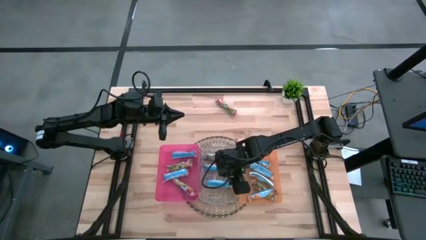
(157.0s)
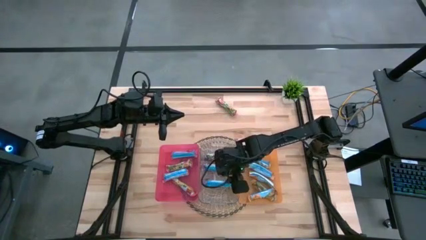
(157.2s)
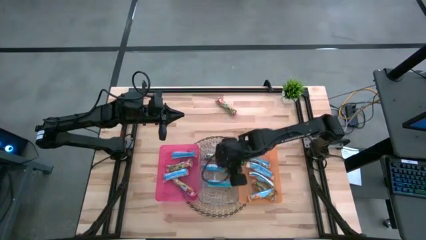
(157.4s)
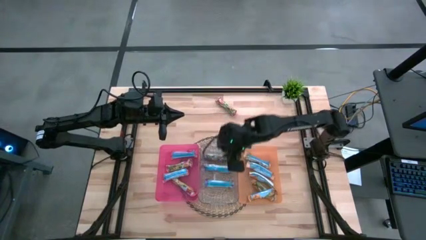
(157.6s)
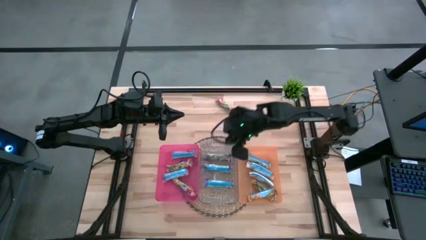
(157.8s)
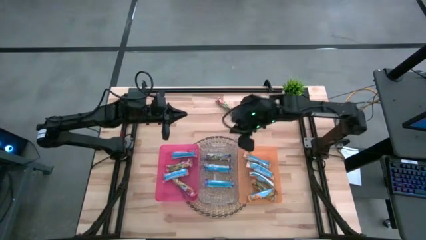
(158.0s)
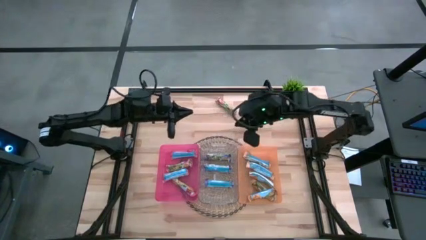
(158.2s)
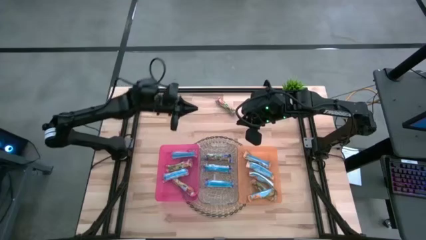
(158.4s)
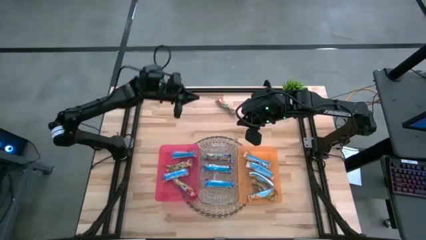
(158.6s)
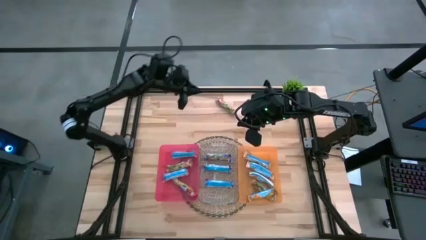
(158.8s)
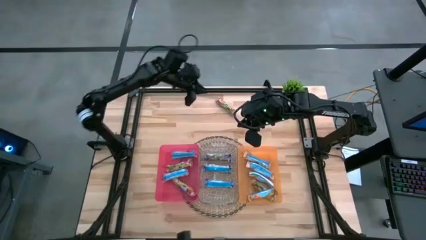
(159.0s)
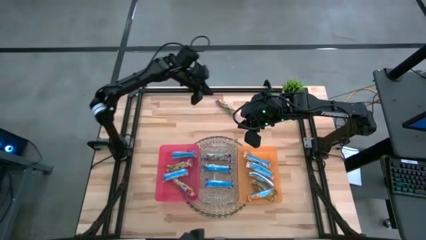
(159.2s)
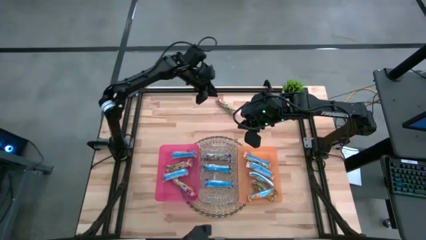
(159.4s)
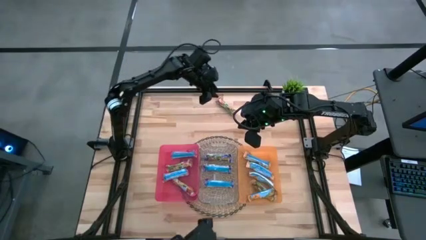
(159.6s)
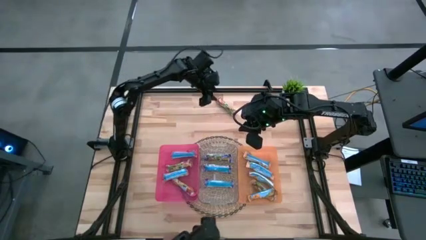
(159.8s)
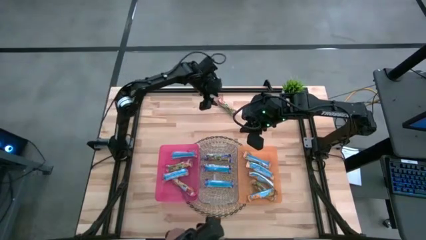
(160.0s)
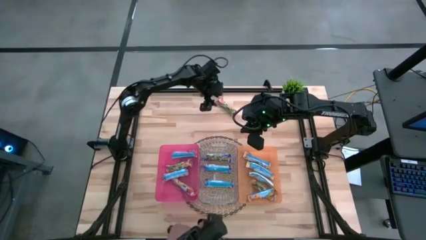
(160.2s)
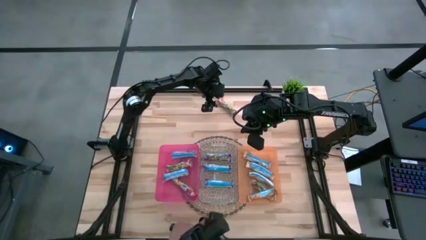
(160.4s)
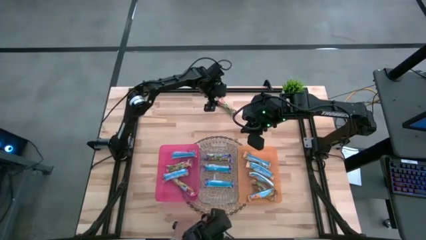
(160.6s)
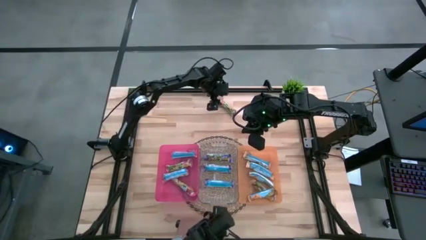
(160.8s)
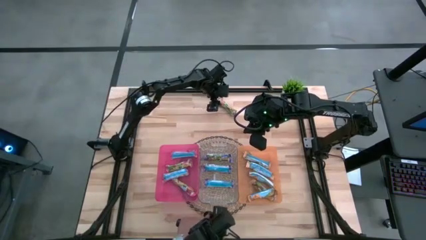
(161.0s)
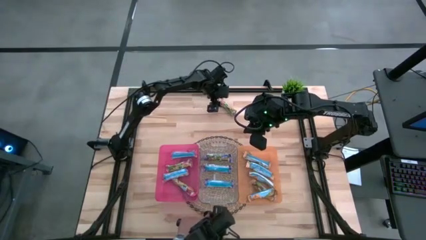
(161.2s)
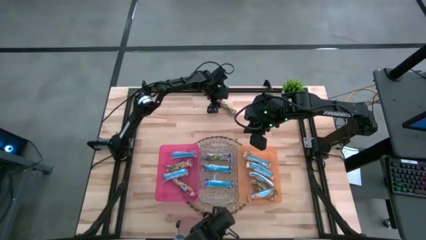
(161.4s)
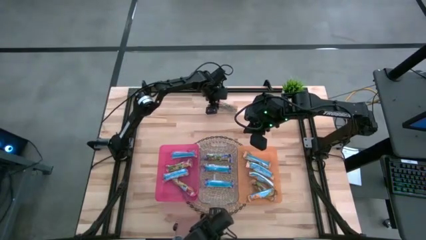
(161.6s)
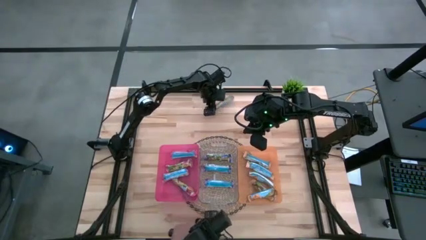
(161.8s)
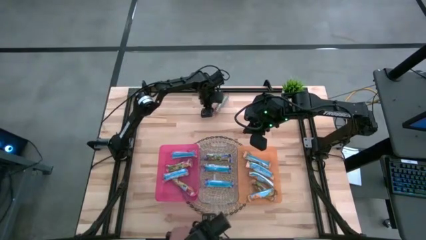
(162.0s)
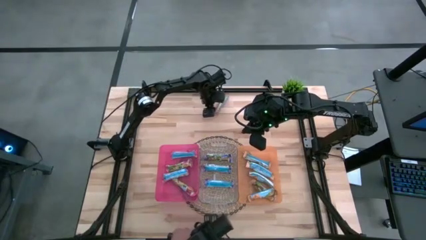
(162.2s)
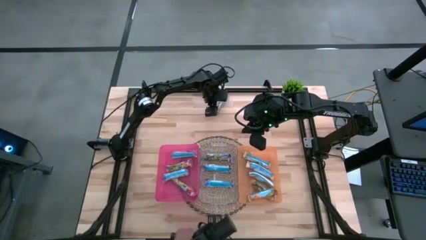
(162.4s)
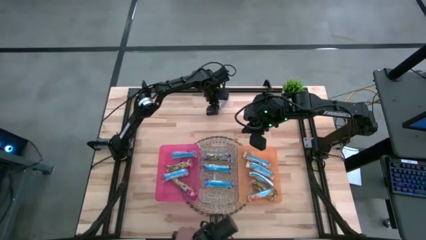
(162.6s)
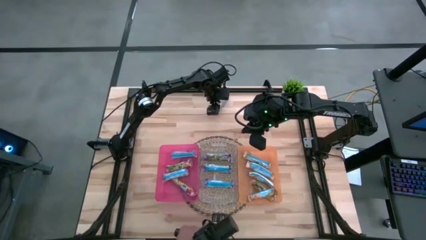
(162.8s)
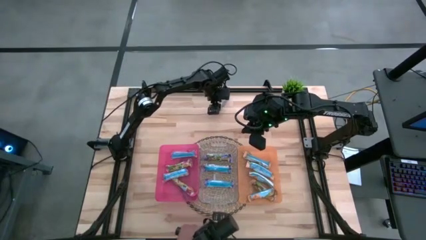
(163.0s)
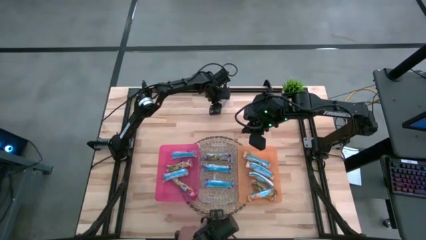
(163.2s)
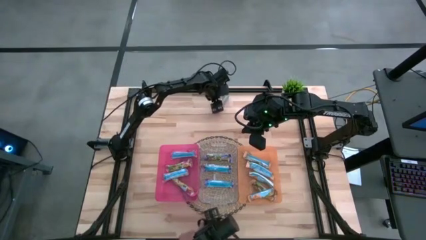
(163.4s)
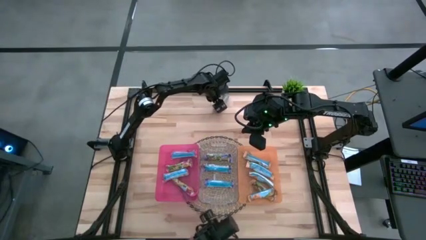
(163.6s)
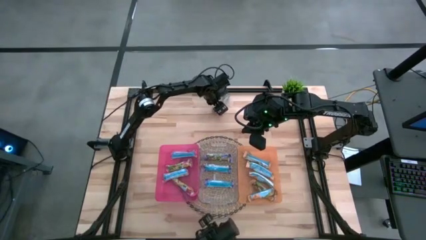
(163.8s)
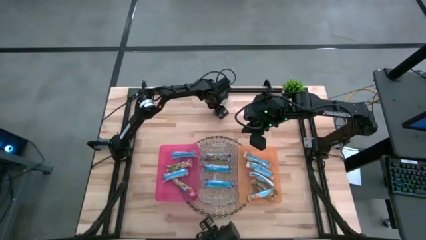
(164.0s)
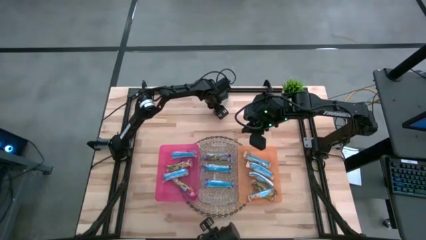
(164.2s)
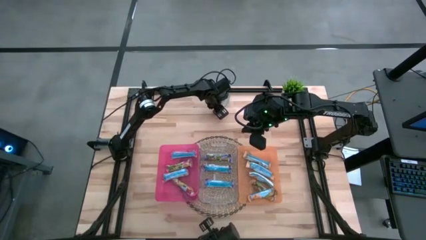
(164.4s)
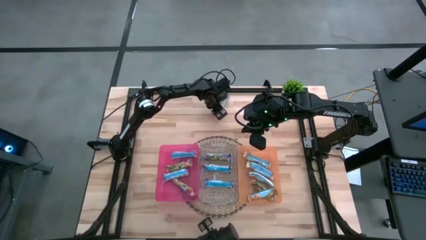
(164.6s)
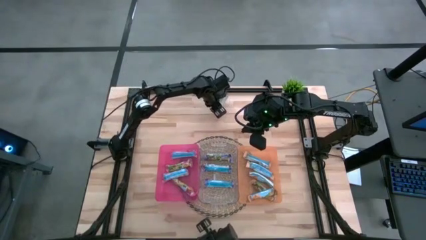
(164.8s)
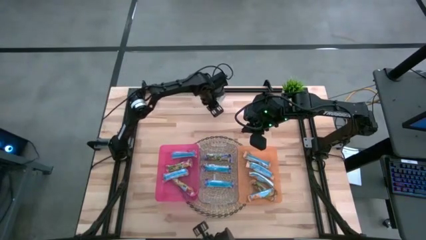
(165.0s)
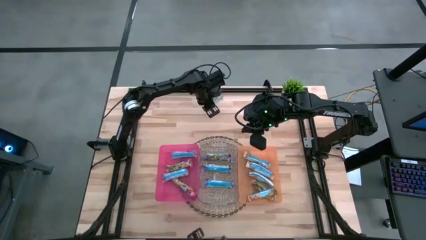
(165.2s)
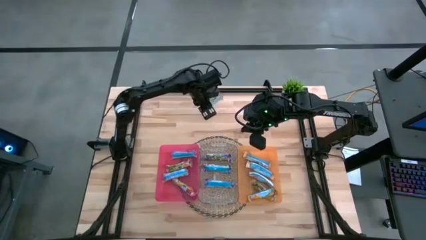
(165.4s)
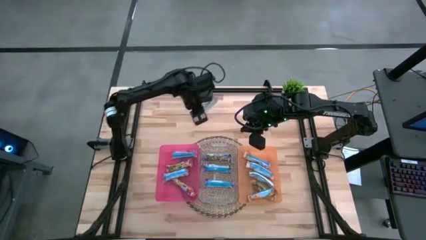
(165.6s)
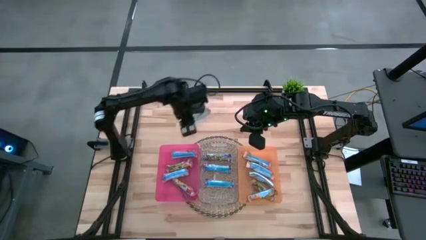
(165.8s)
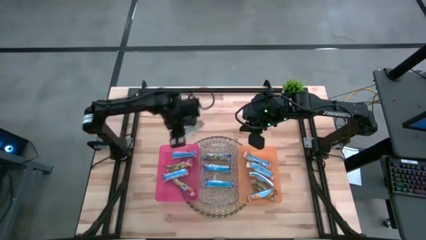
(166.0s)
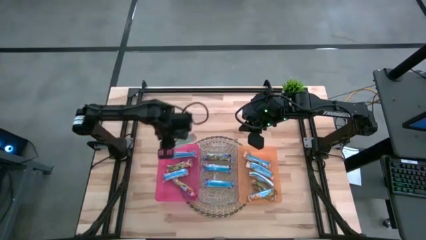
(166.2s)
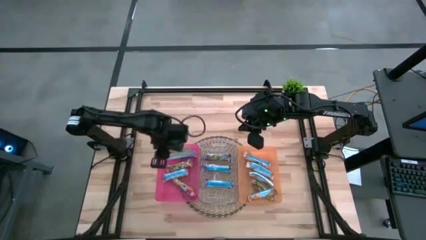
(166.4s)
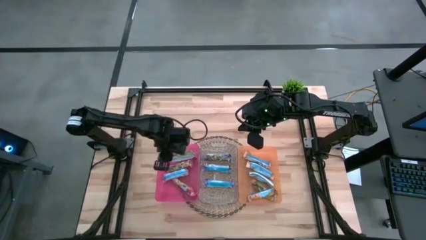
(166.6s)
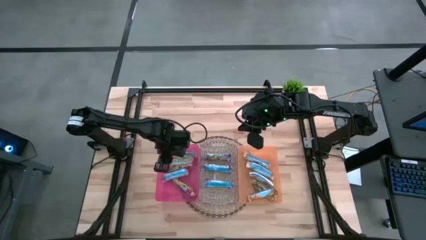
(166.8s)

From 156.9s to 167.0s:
Task: Pick and place Granola Bars by type
Put the red granola bar into the pink bin

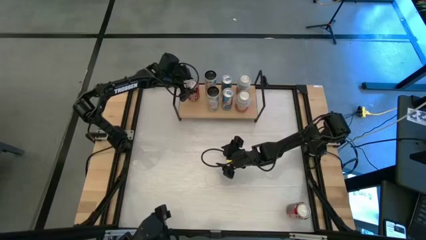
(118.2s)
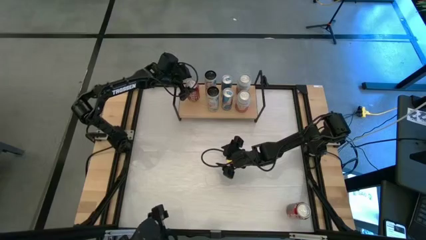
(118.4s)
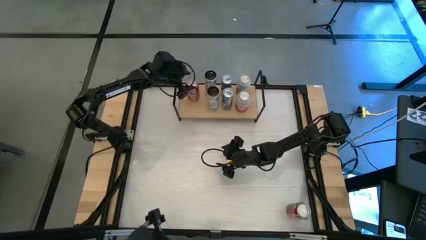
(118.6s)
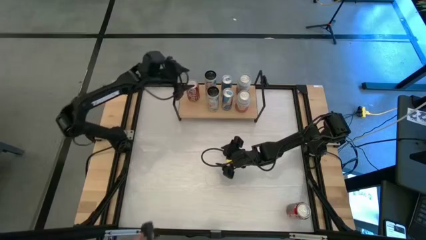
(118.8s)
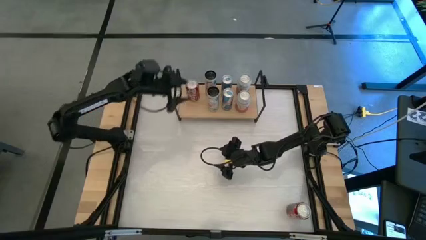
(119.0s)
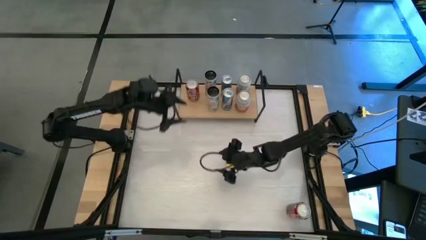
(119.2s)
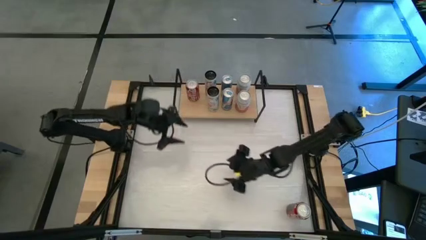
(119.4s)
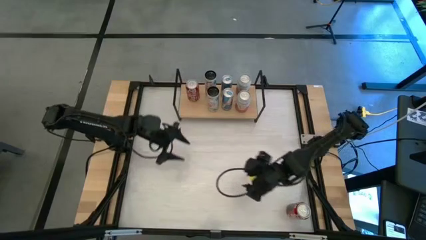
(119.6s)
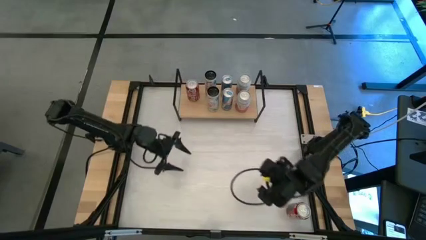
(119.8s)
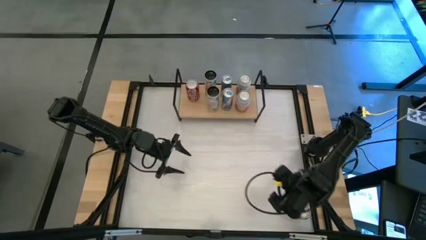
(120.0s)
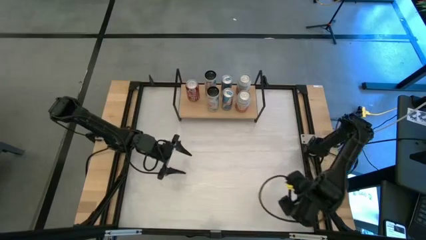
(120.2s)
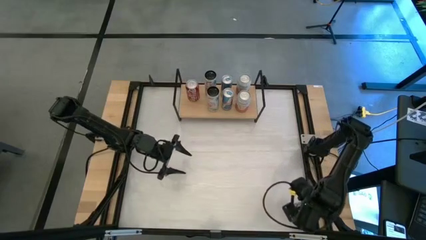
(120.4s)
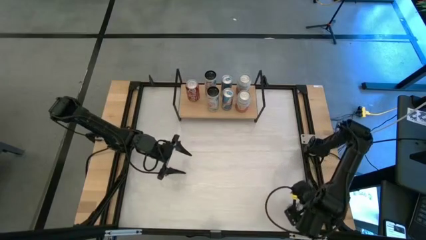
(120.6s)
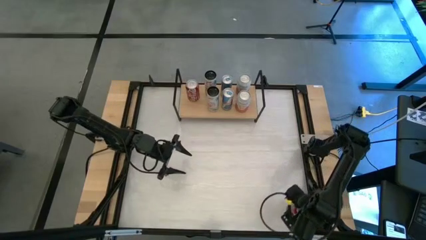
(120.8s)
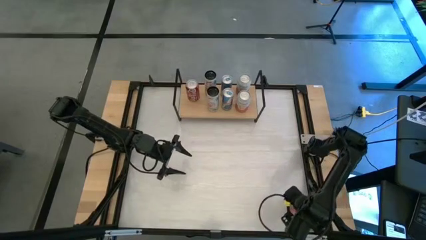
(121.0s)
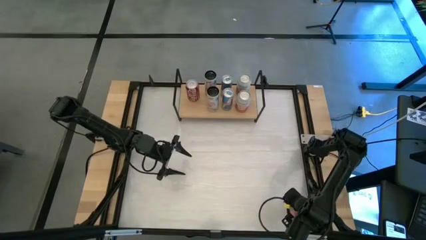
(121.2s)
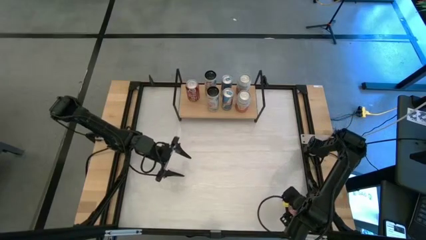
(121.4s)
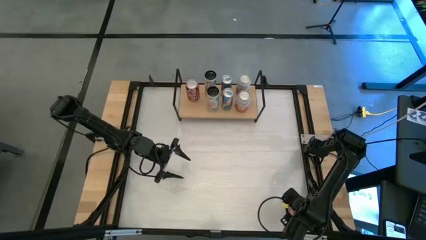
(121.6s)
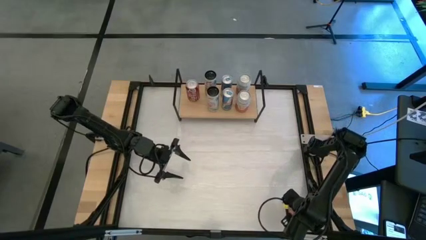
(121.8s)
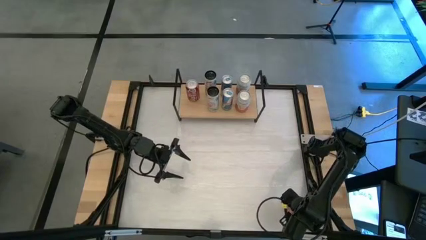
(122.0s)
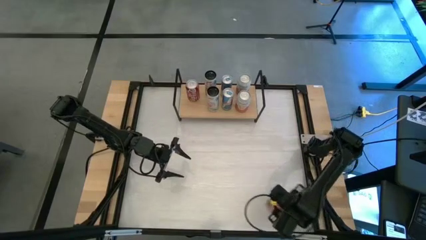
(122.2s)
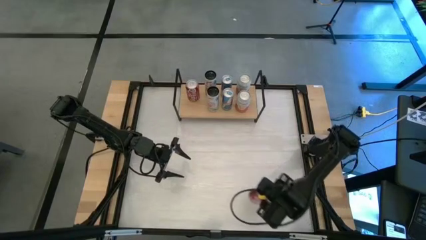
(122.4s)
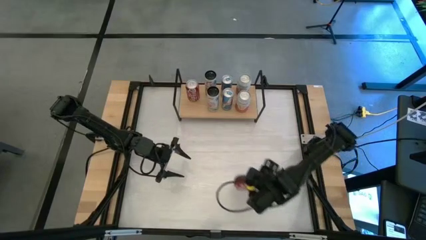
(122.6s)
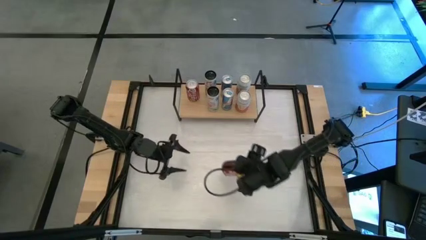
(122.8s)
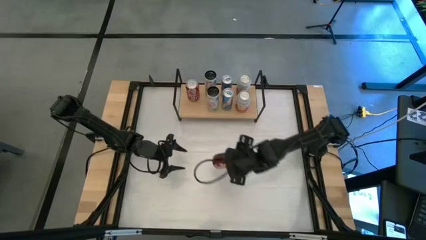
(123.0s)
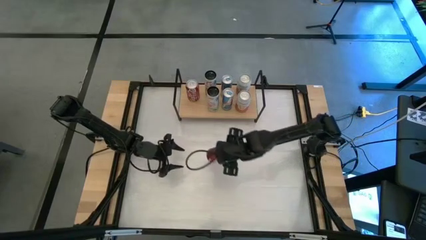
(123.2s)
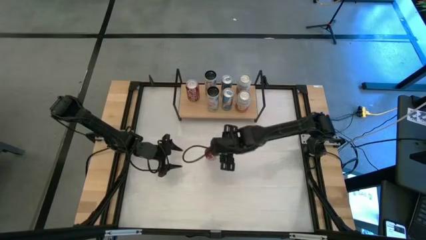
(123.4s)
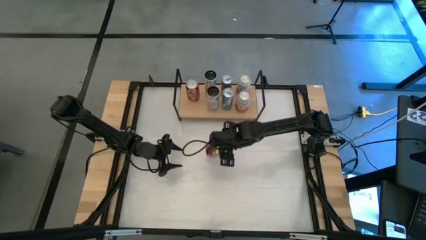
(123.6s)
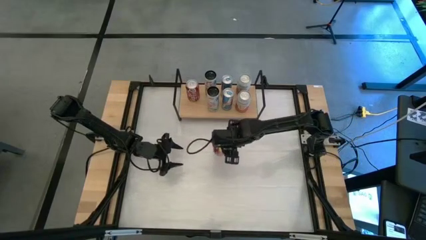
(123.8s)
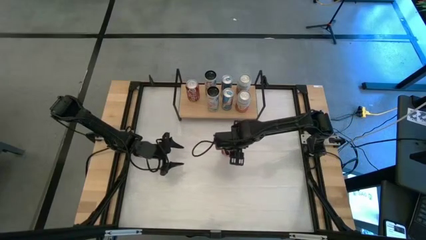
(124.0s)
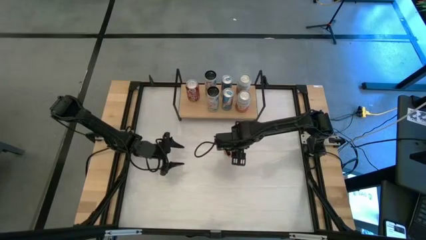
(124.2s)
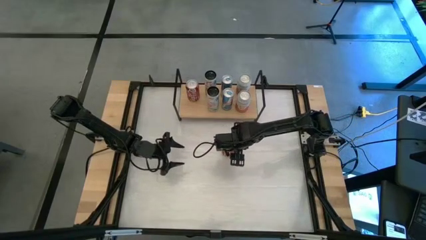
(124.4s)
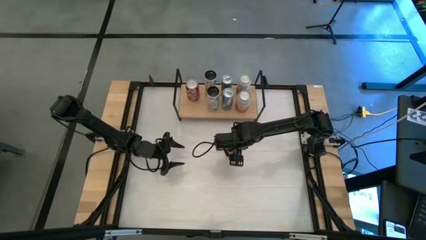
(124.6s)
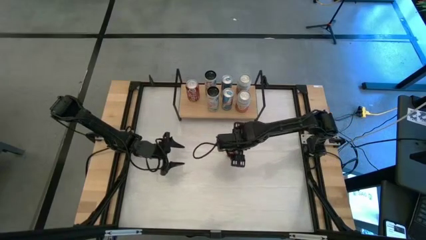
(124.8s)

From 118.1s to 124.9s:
Task: Place canned beverage on shelf
Move the red soda can to the center of the table
